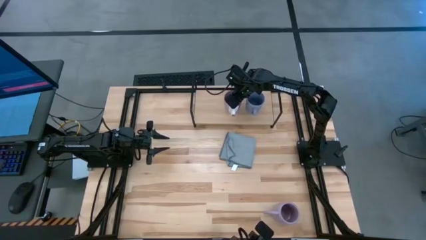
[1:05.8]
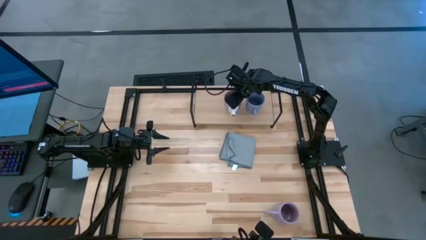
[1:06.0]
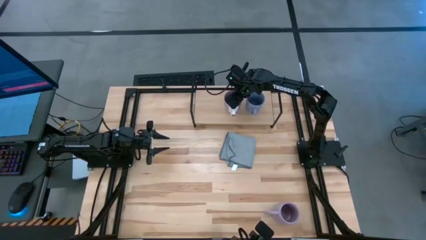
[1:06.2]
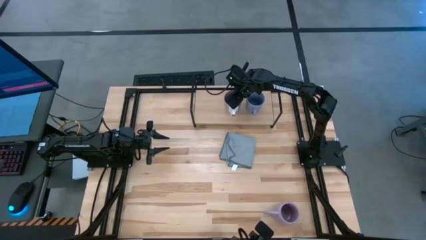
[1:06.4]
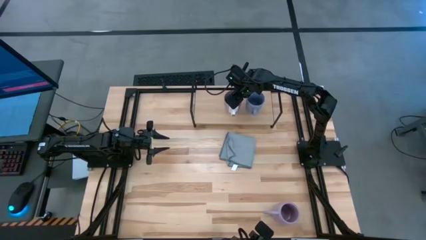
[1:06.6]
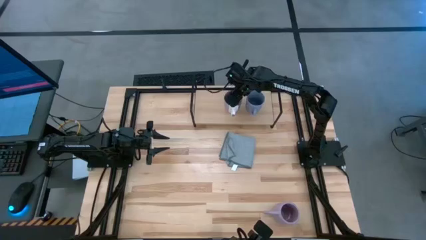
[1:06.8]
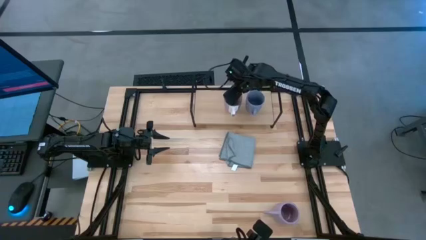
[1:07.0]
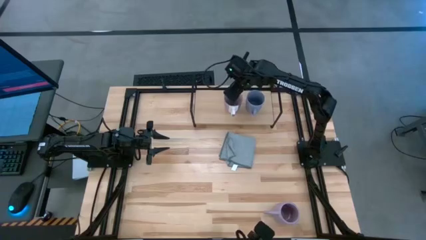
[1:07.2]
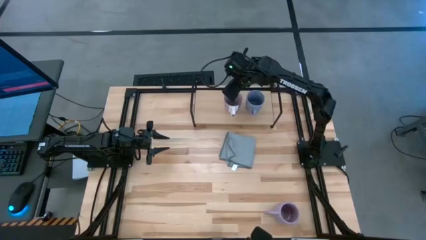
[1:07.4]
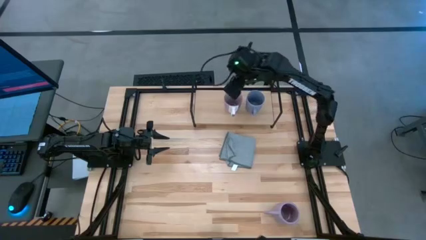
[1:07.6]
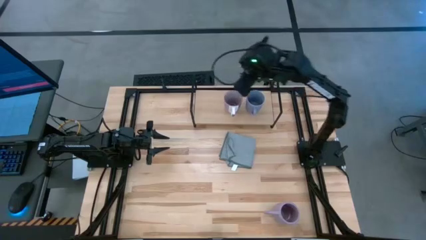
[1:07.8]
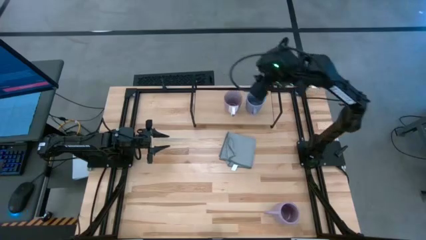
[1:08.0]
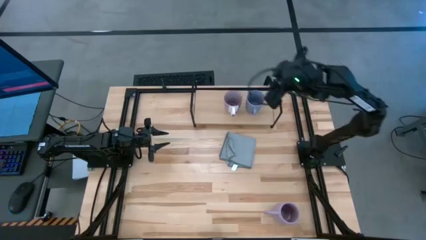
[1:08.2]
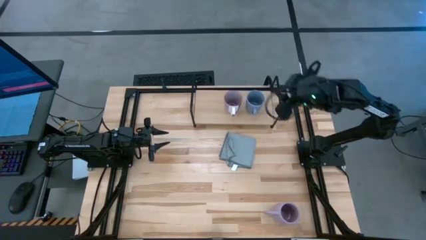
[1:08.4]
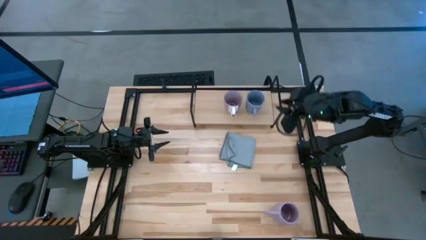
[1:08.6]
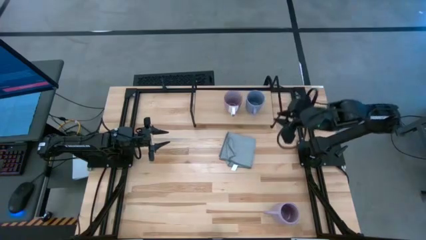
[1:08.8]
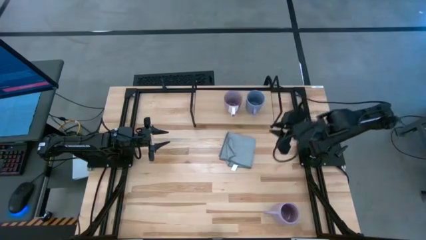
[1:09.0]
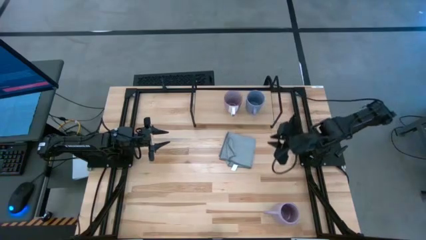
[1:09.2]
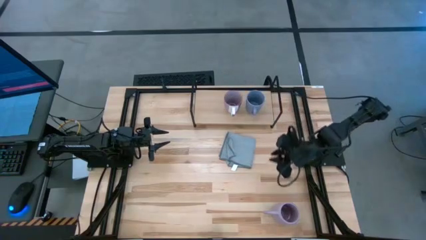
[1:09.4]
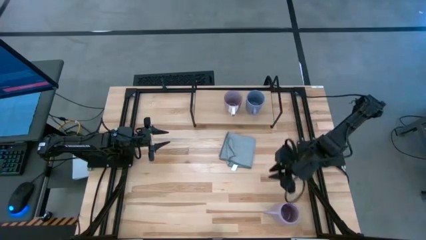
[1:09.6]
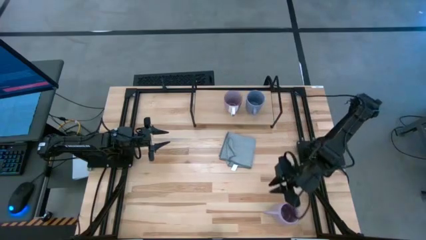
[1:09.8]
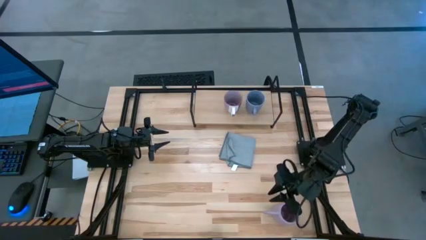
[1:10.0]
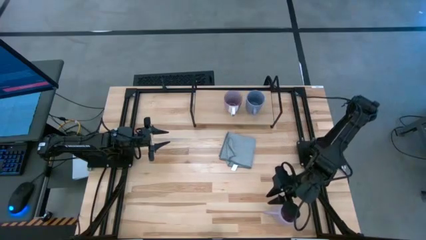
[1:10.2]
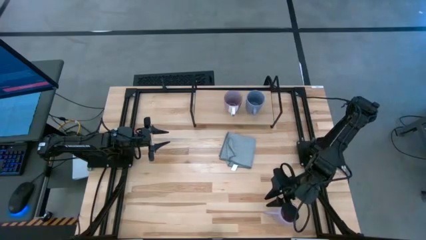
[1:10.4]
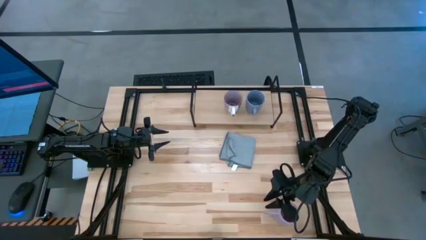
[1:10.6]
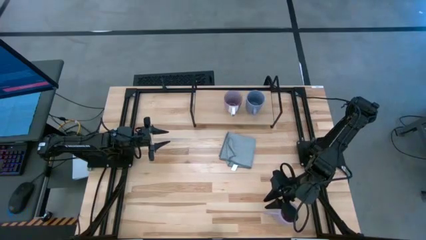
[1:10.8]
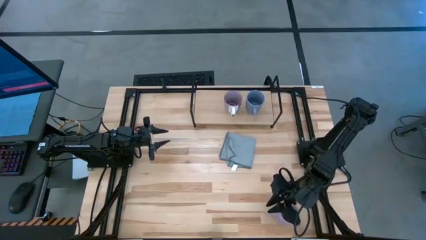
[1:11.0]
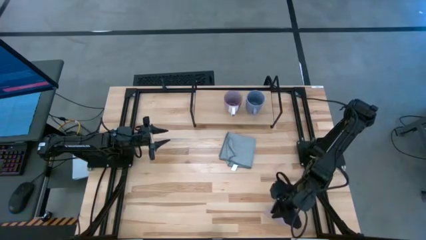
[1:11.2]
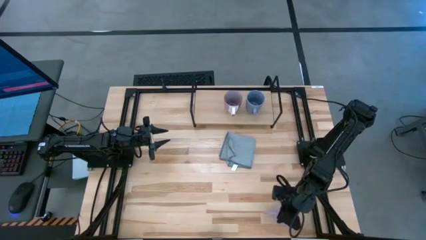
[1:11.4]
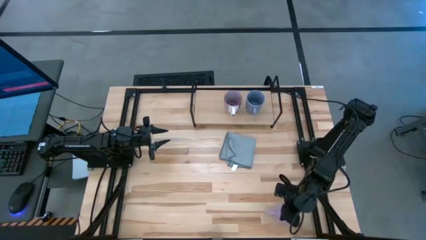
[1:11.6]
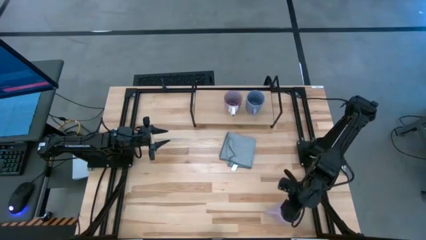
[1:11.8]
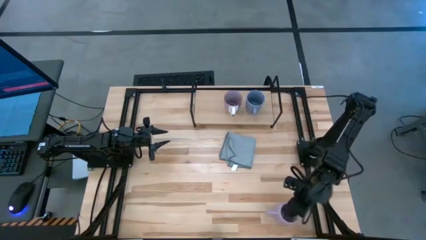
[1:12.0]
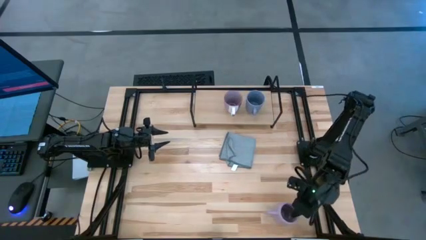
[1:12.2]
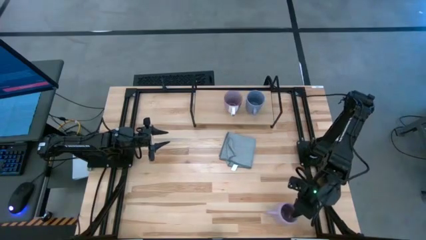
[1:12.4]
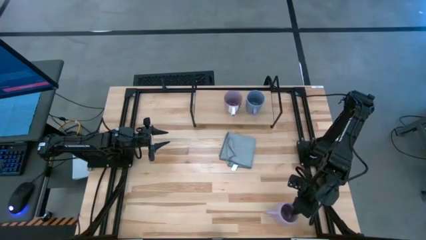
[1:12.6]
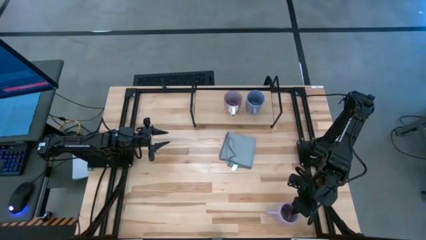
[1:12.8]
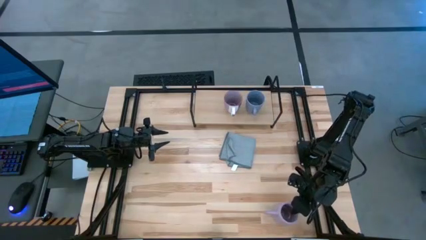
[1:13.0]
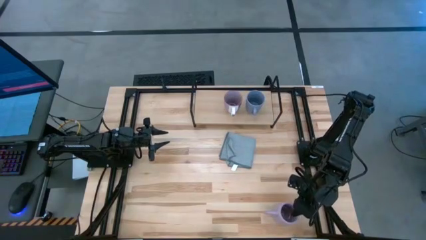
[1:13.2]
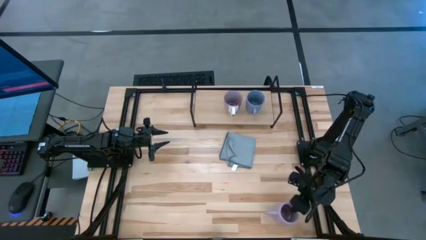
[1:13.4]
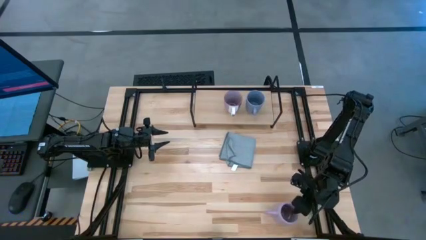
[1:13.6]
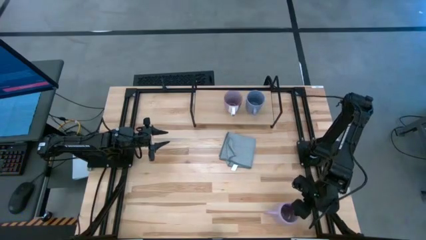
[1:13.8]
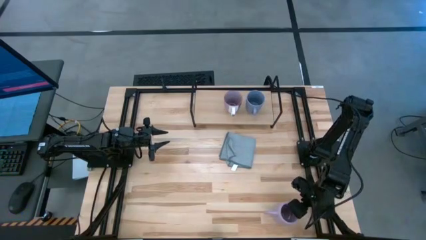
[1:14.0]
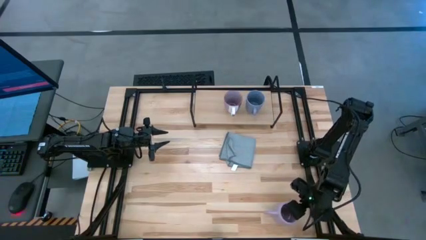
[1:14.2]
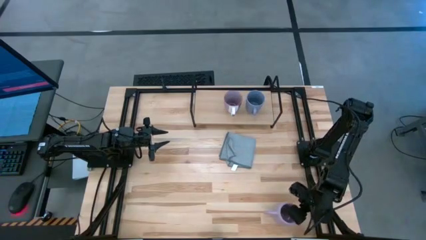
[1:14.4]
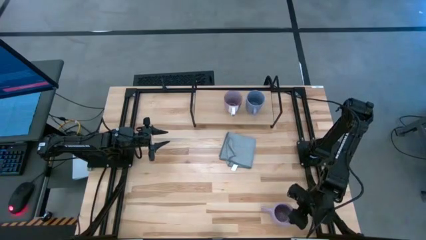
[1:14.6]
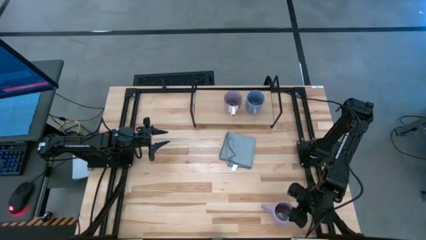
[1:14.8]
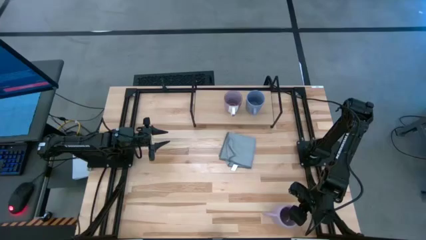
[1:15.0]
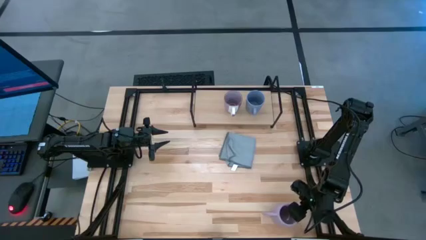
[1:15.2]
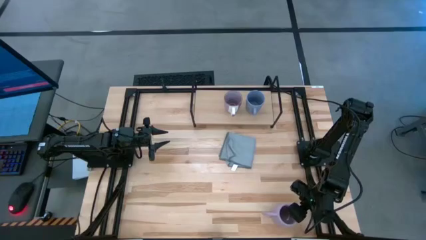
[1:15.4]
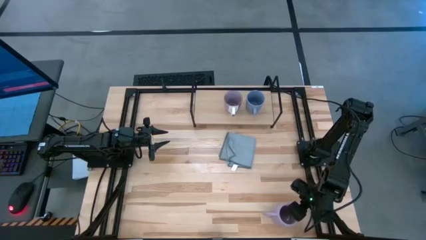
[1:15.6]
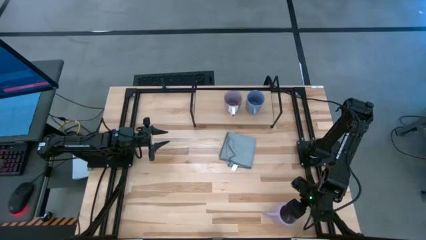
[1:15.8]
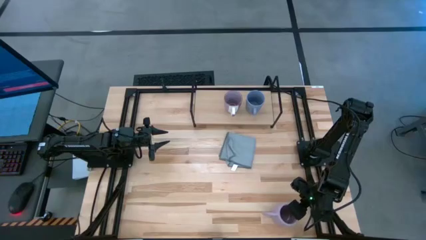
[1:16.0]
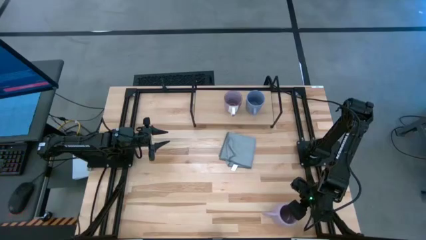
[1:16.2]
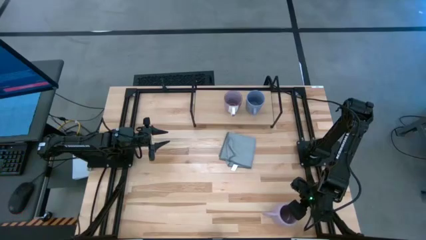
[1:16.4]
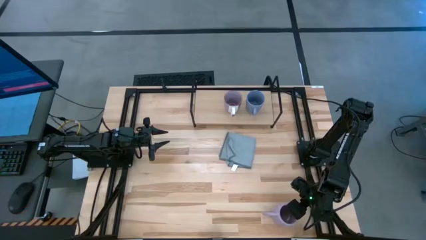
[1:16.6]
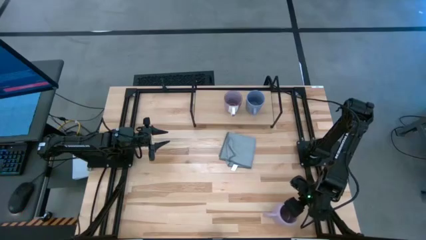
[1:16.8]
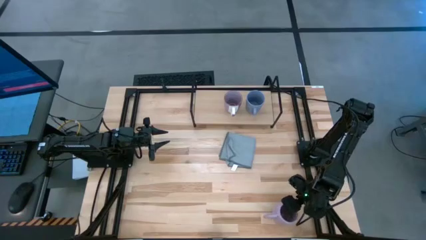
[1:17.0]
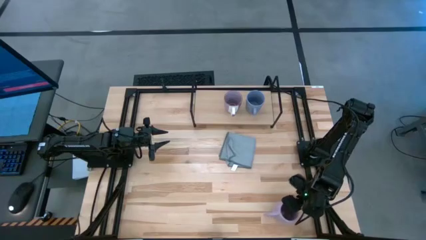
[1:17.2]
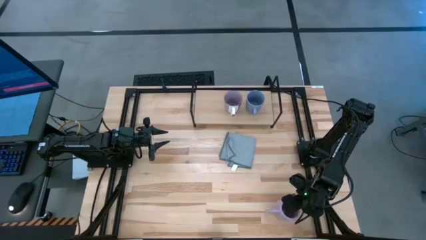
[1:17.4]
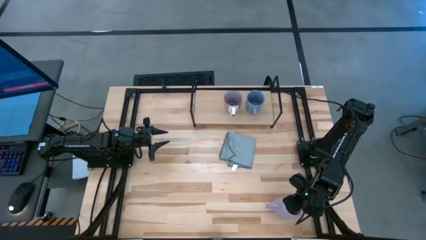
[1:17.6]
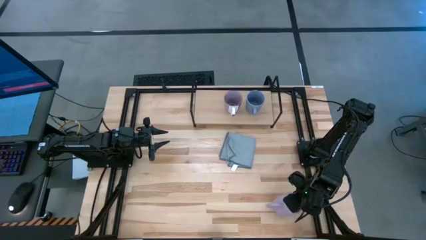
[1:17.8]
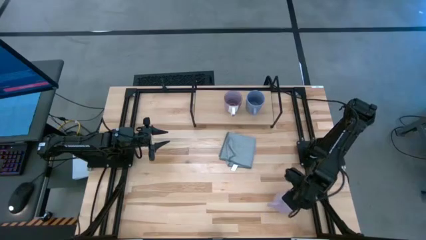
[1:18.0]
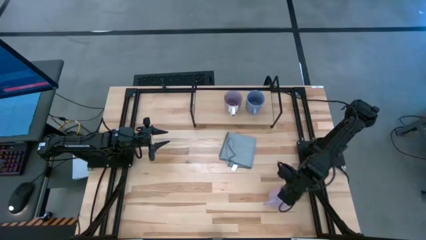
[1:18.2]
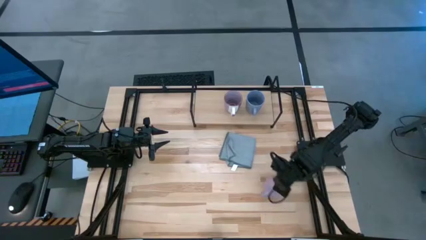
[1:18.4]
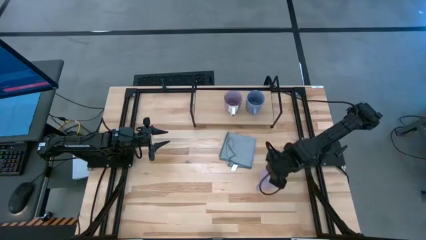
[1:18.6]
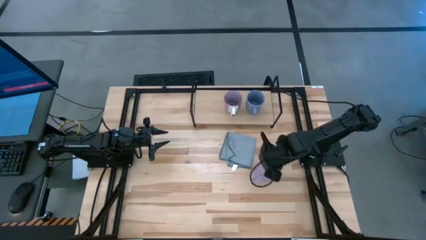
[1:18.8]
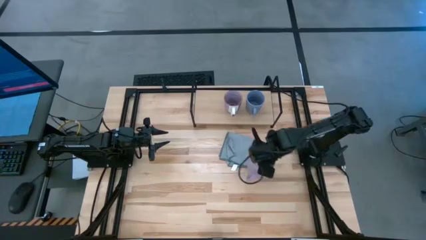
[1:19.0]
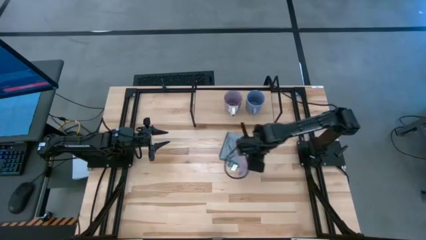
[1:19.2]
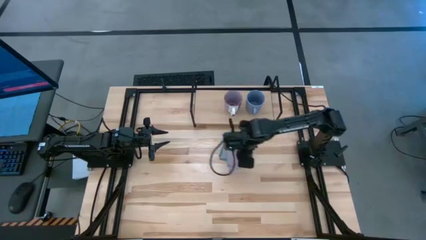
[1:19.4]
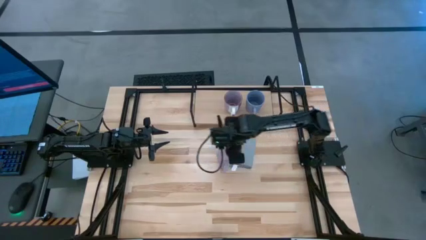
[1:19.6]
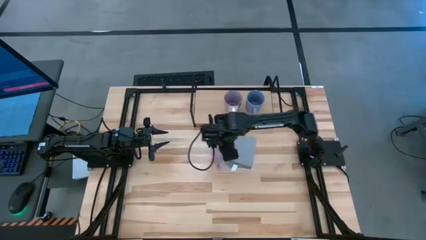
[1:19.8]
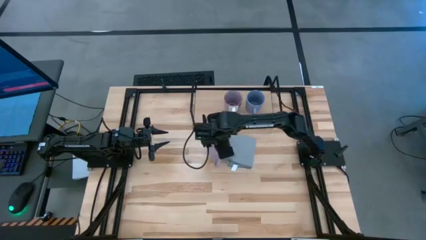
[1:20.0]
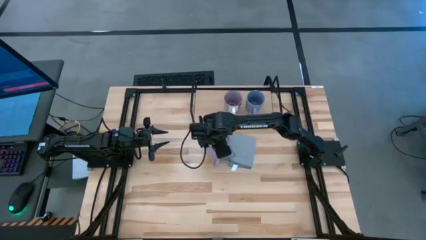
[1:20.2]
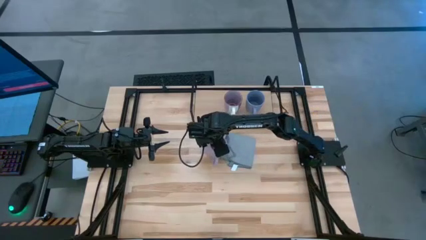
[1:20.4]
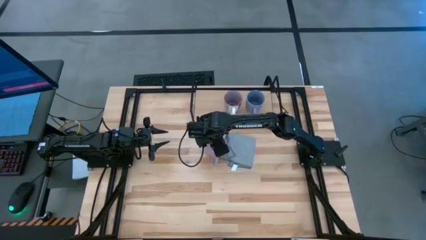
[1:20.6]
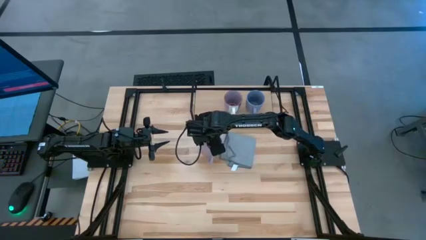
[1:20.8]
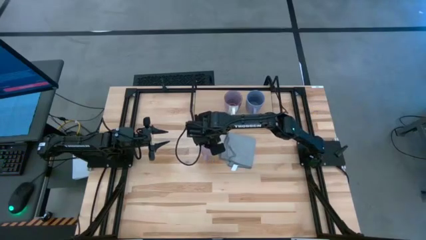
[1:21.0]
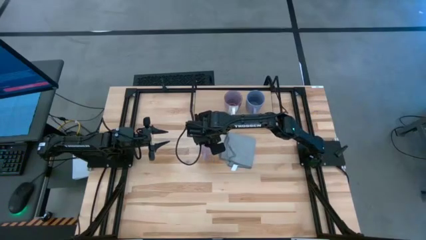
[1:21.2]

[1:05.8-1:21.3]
Task: Stack small to large cups/mugs on shelf
Put the purple mug on the shelf
